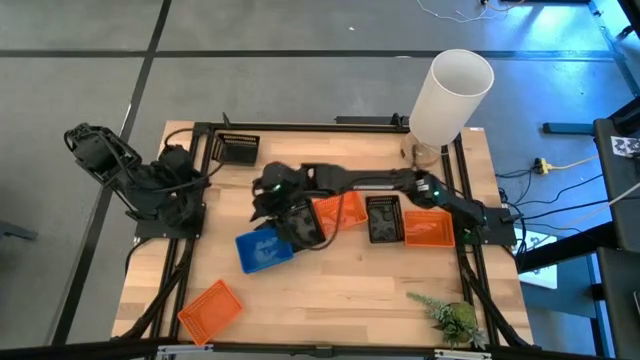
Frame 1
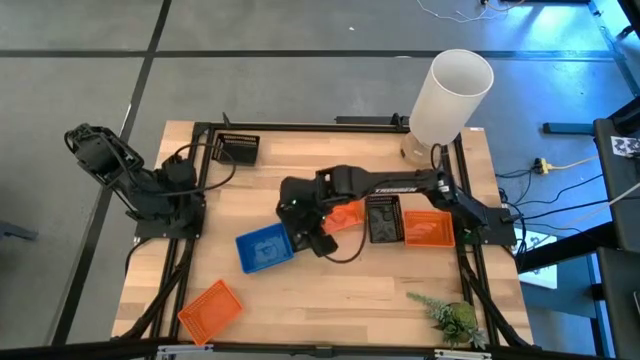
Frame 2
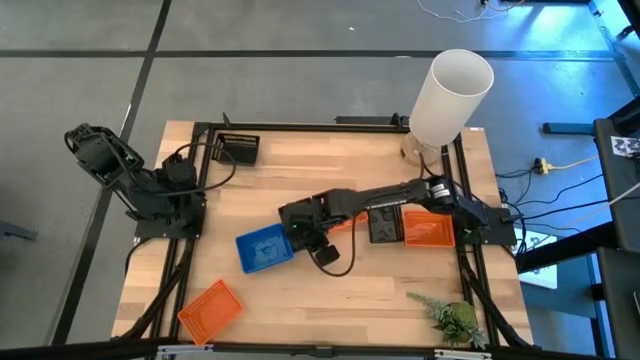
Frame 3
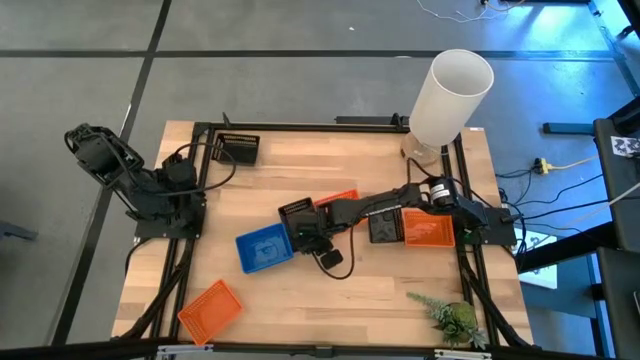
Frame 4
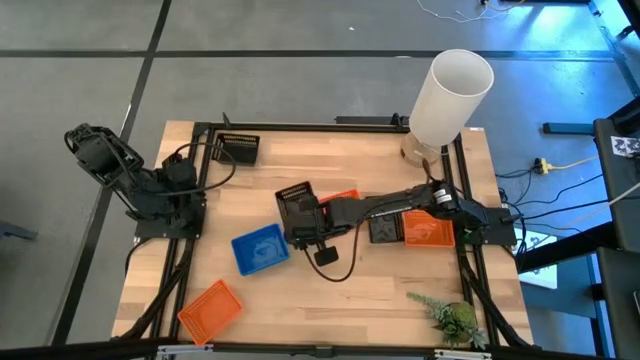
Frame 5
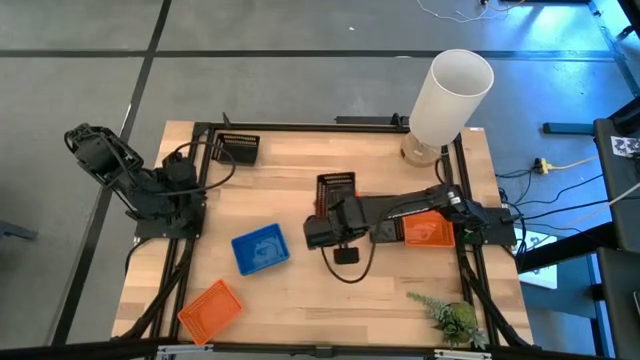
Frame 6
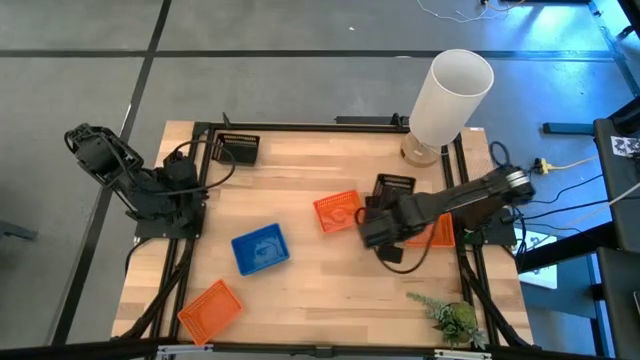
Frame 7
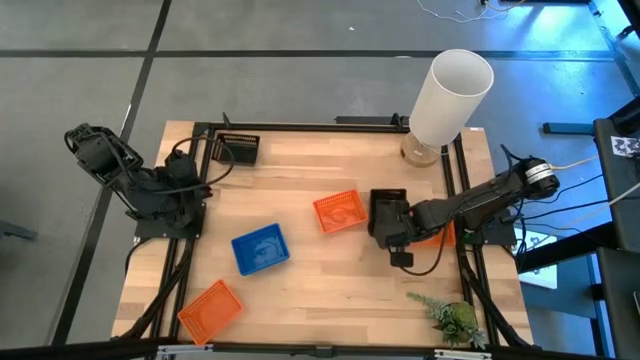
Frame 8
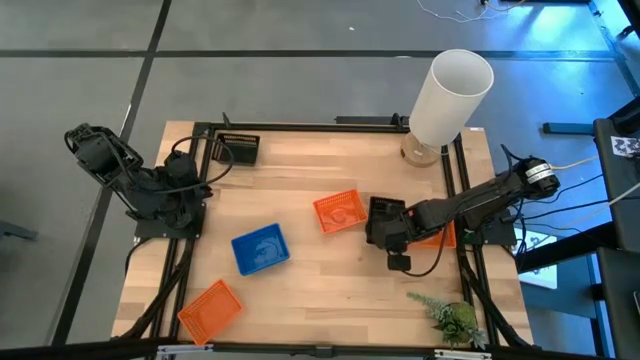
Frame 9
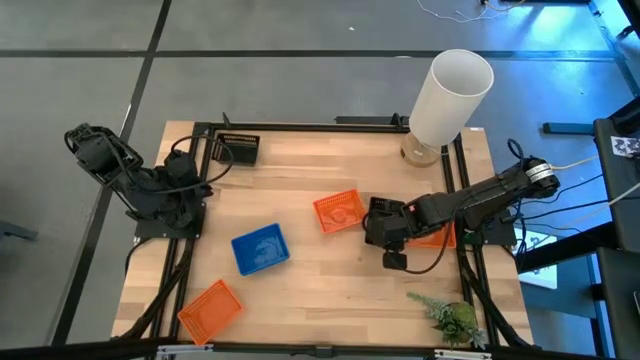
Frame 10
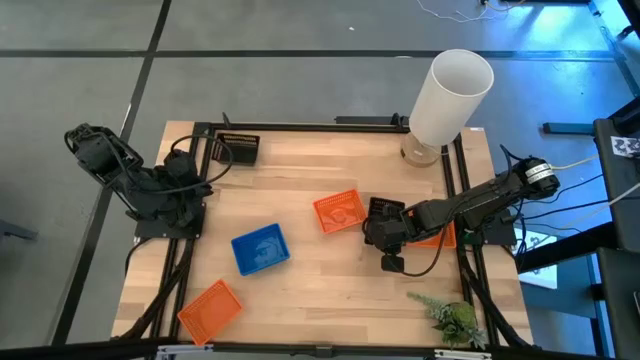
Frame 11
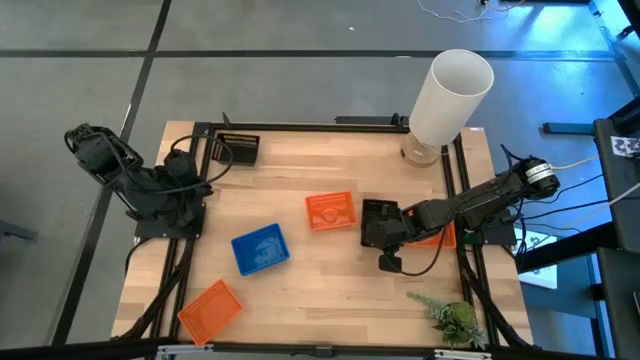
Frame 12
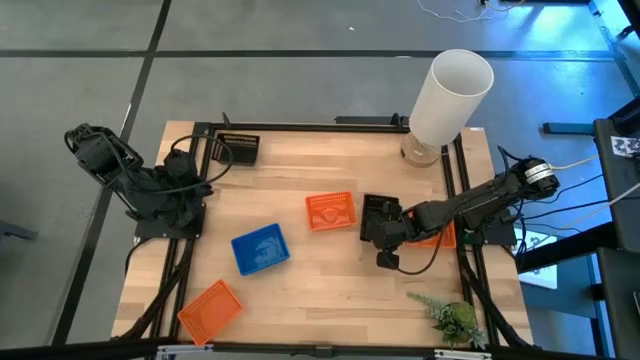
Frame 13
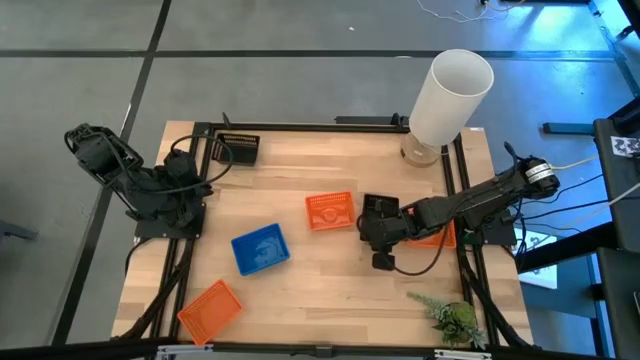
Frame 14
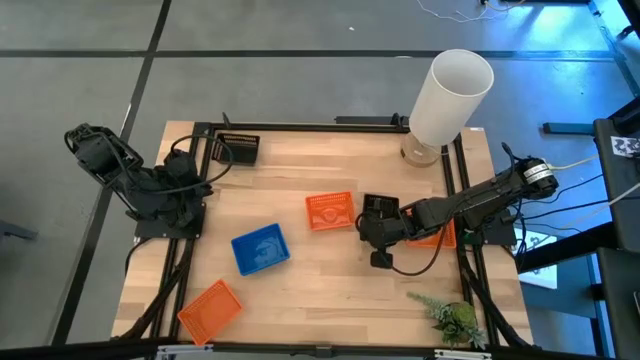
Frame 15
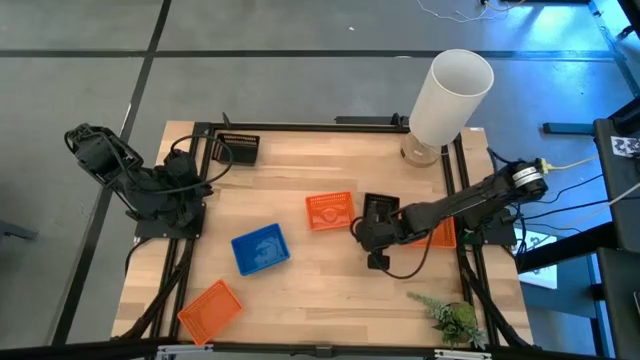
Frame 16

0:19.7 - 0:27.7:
Stack the bottom left black bin on the bottom right black bin

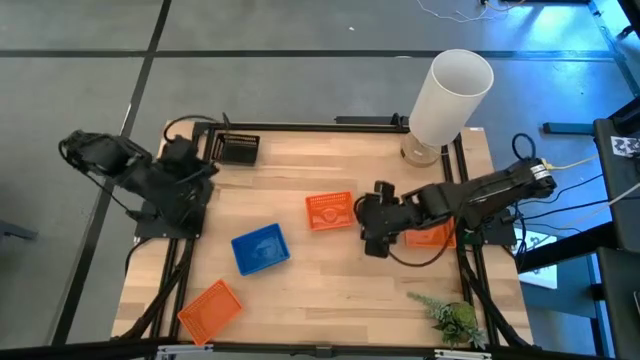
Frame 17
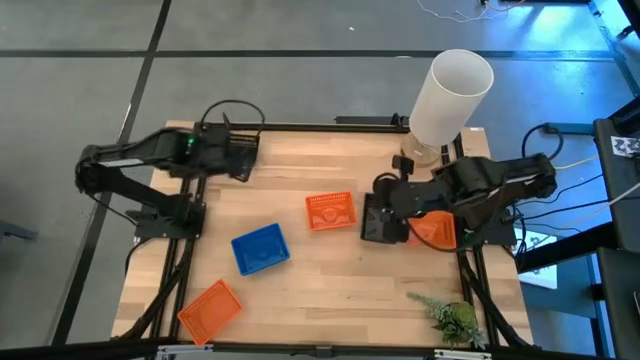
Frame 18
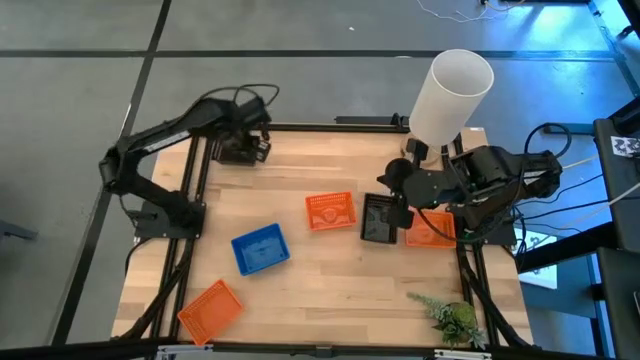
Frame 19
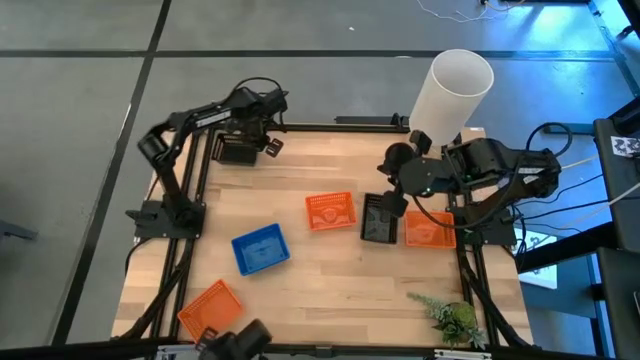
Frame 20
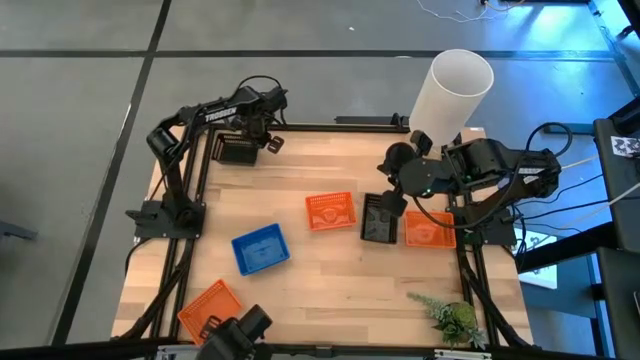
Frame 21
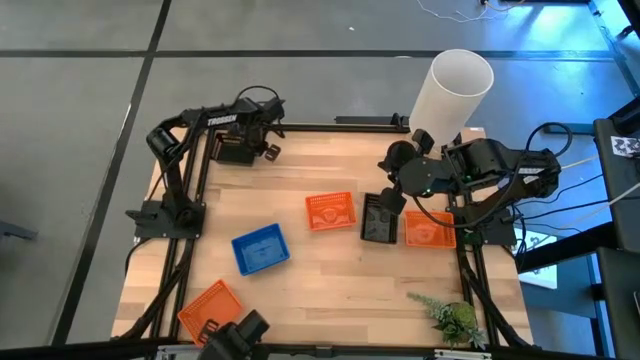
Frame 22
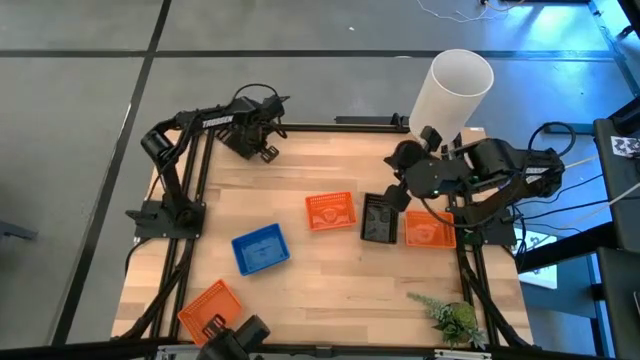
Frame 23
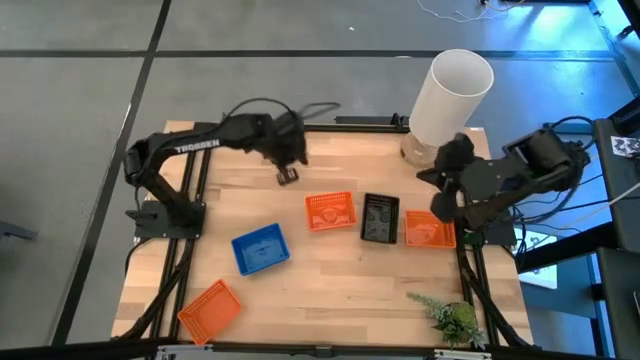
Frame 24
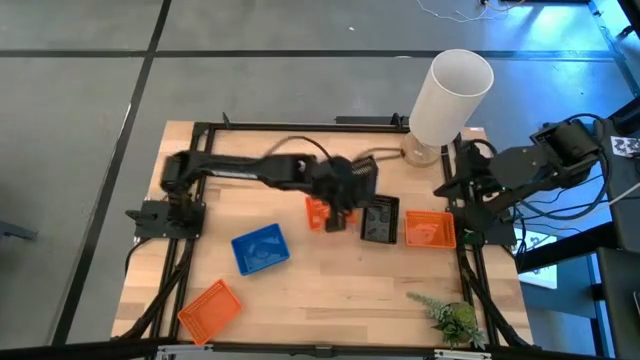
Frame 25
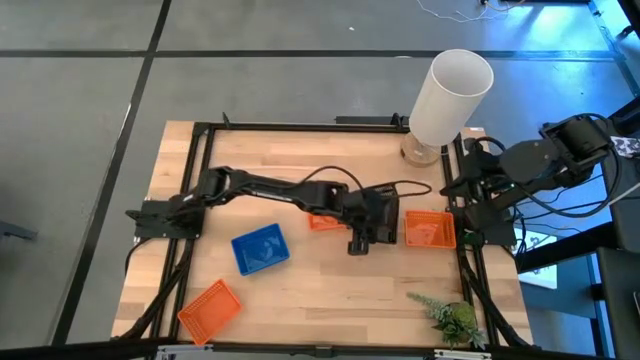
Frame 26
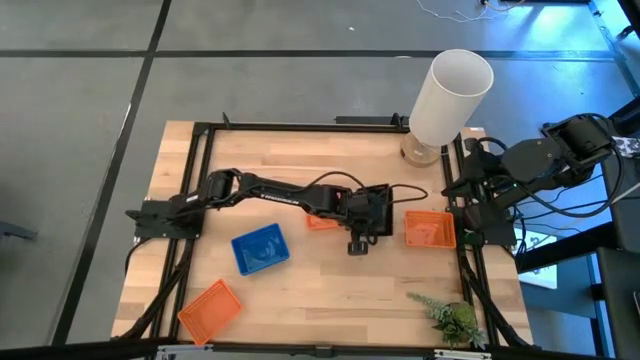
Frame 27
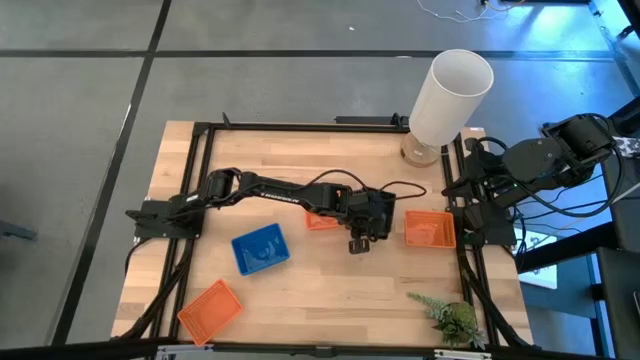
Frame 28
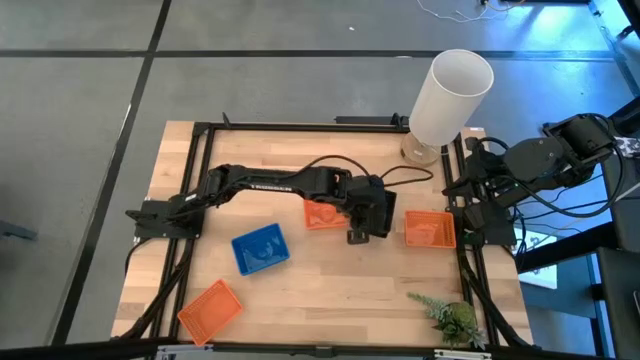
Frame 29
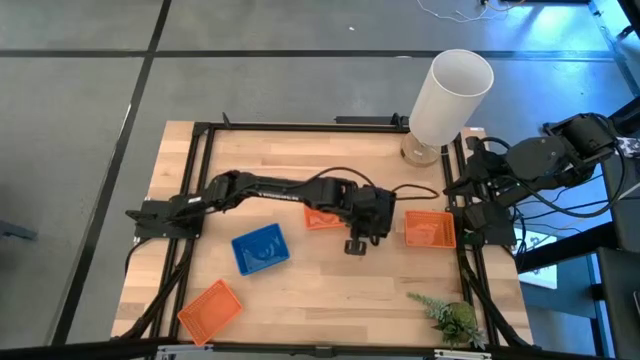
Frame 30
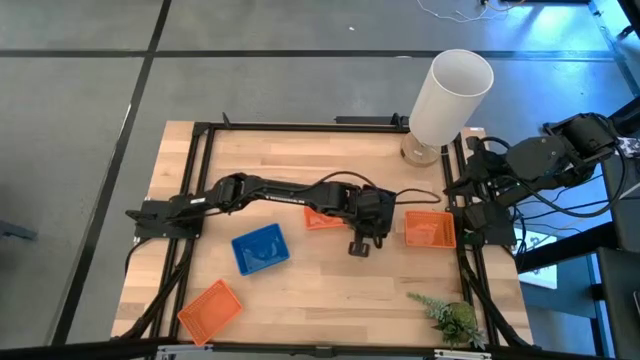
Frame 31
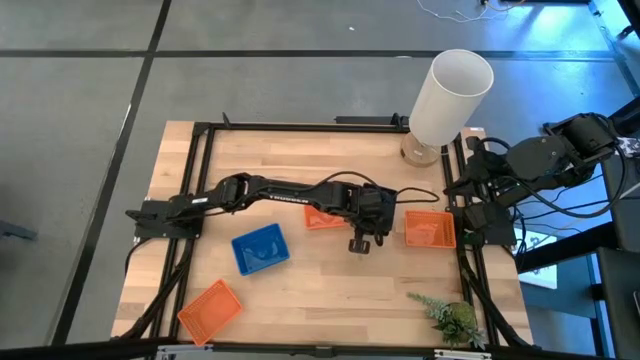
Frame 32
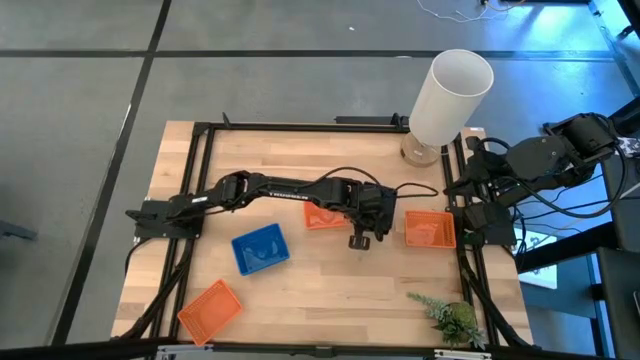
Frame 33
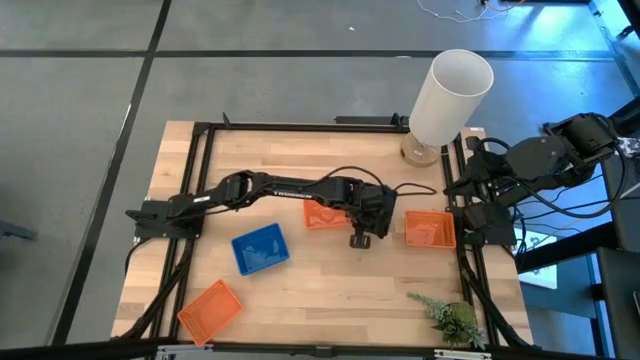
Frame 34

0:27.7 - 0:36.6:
Stack the top black bin on the stacked black bins

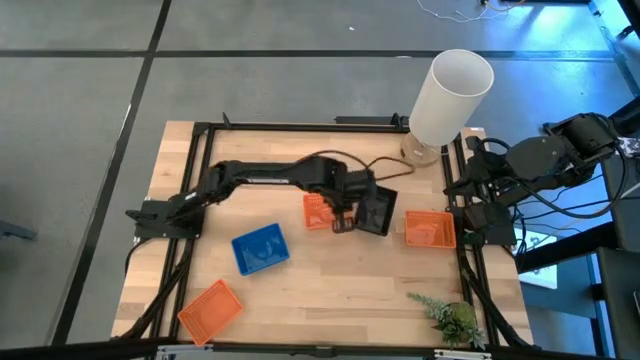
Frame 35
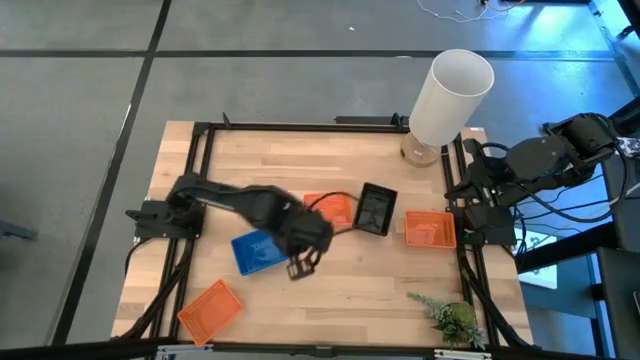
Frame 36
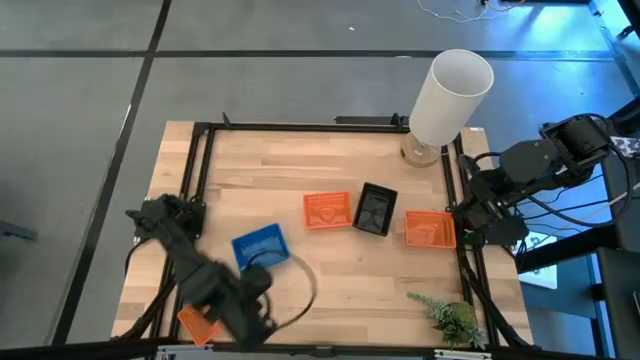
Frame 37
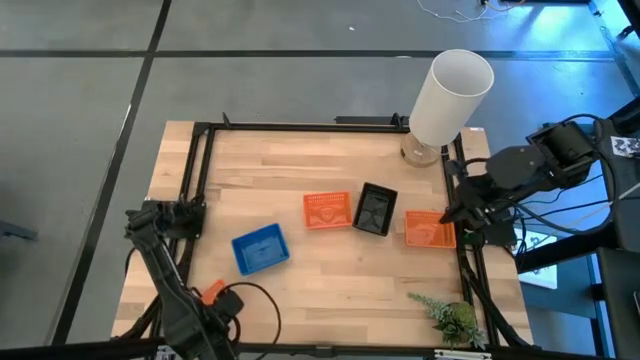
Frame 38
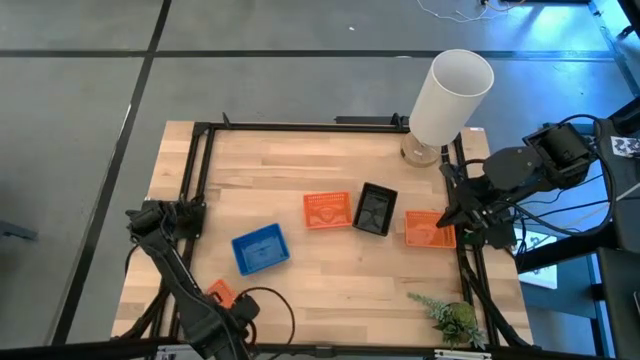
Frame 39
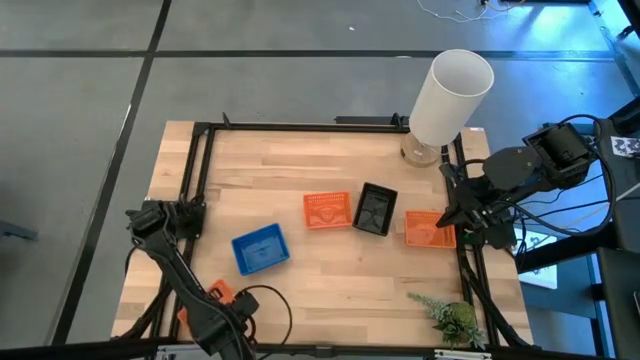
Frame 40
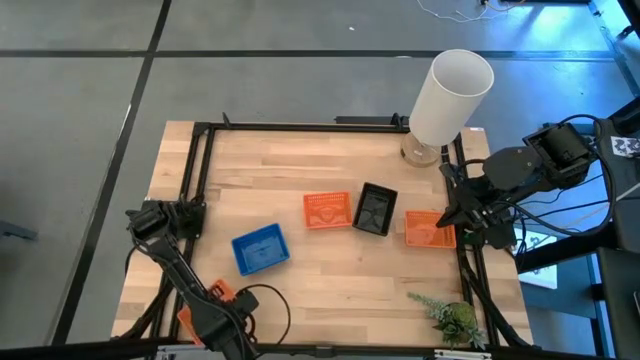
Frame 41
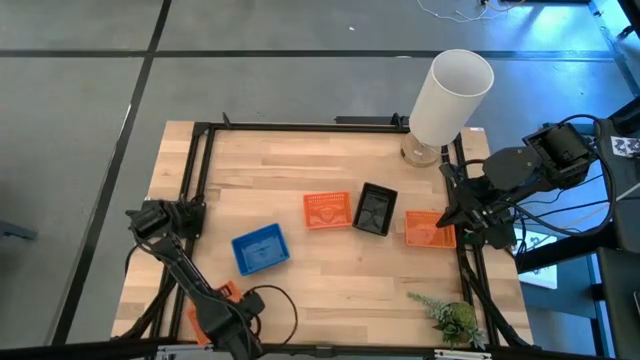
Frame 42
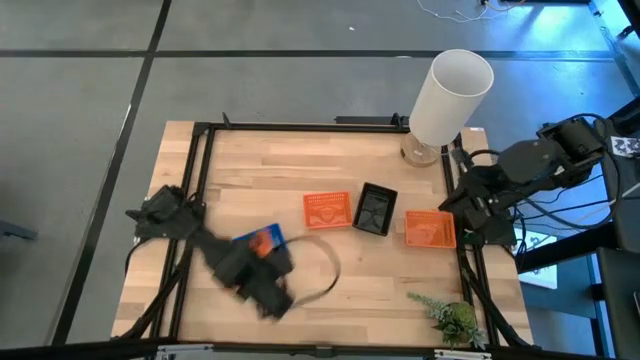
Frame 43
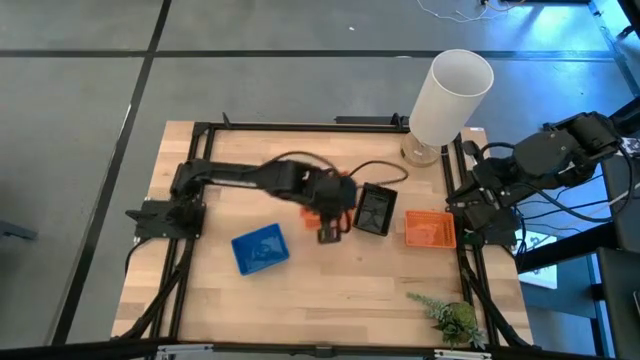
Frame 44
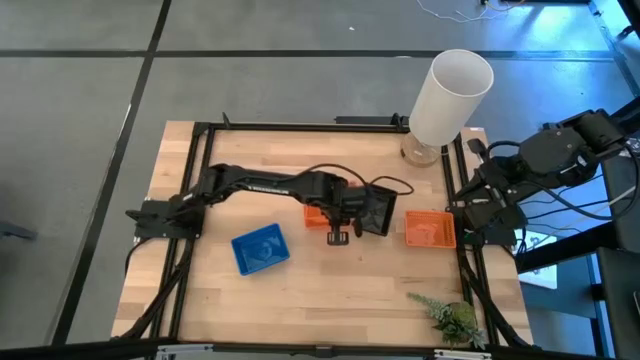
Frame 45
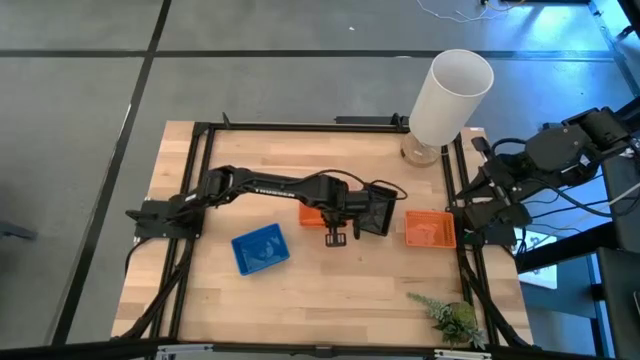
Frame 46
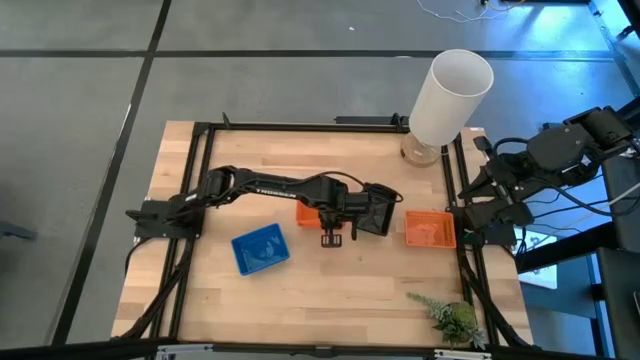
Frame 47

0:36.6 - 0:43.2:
Stack the bottom left orange bin on the top left orange bin
